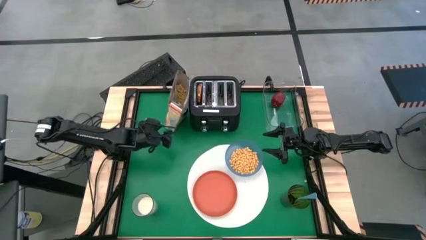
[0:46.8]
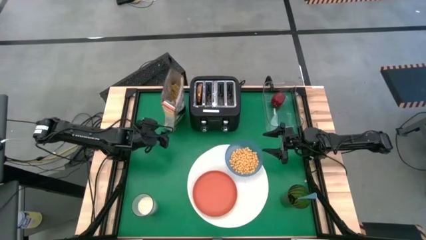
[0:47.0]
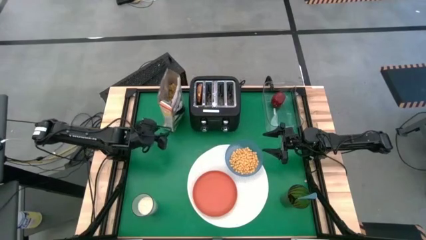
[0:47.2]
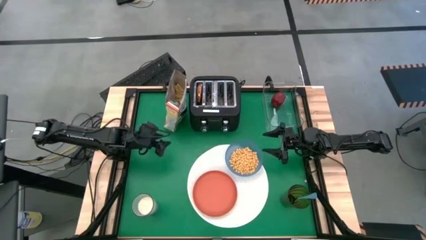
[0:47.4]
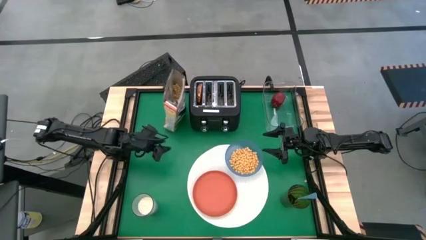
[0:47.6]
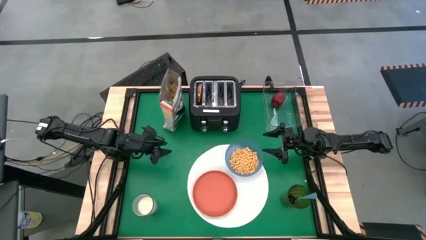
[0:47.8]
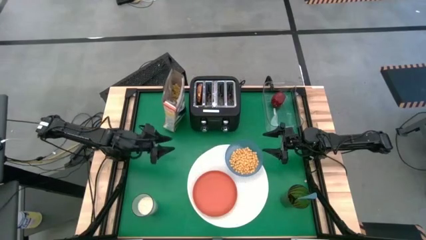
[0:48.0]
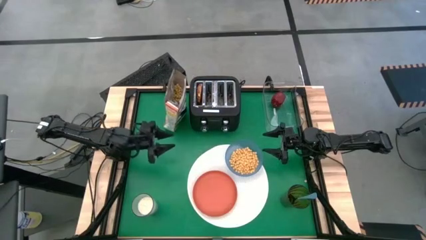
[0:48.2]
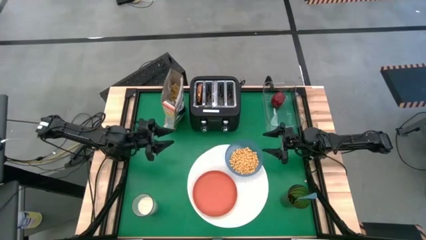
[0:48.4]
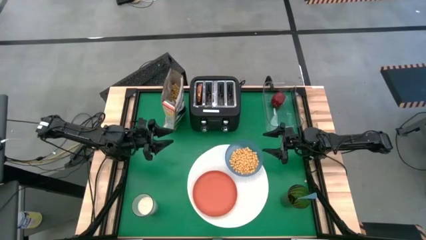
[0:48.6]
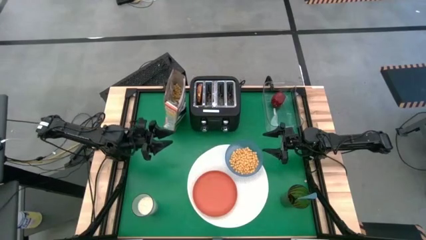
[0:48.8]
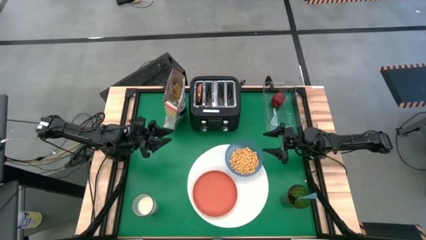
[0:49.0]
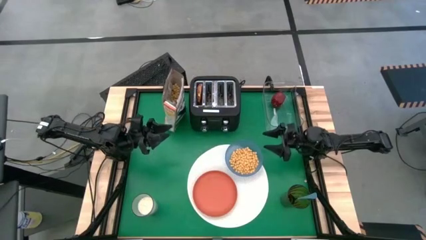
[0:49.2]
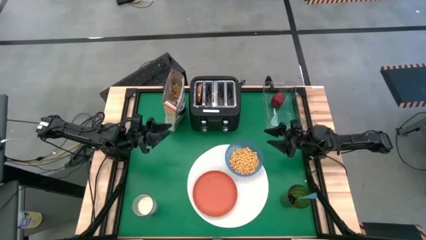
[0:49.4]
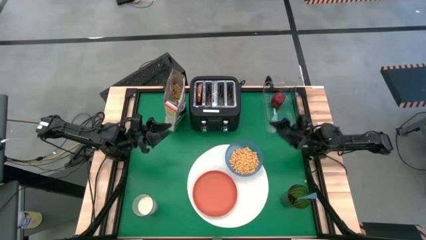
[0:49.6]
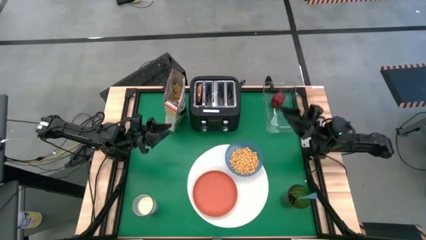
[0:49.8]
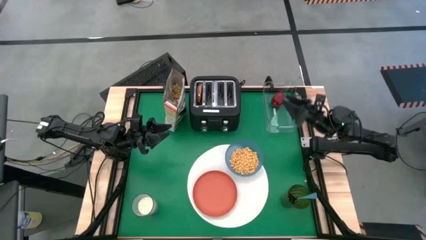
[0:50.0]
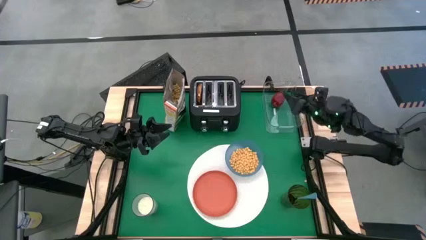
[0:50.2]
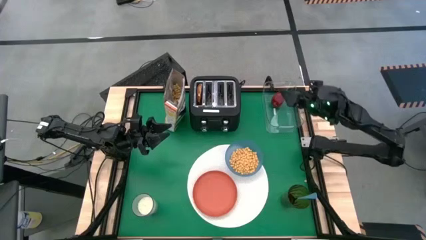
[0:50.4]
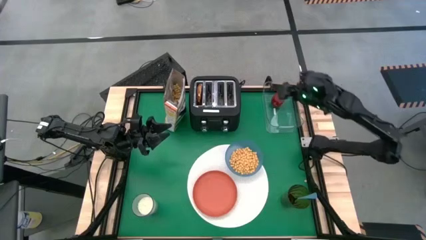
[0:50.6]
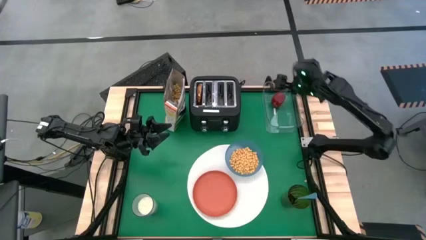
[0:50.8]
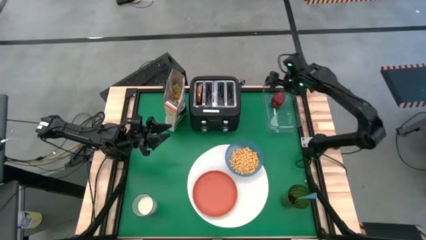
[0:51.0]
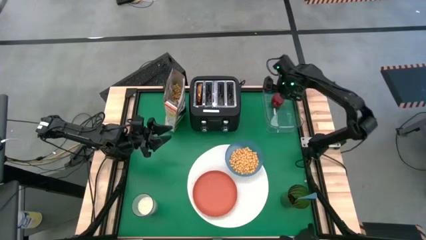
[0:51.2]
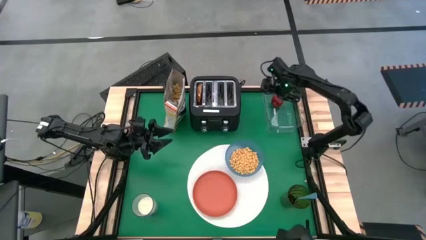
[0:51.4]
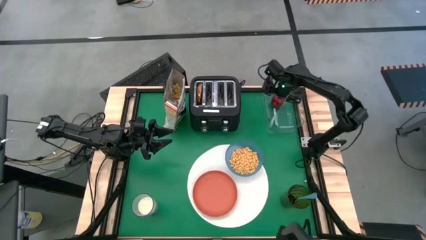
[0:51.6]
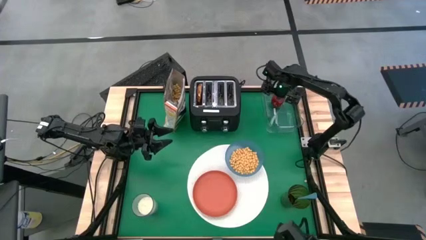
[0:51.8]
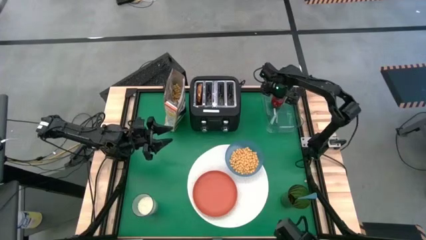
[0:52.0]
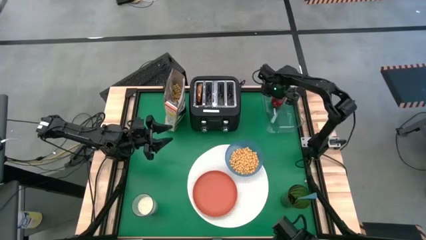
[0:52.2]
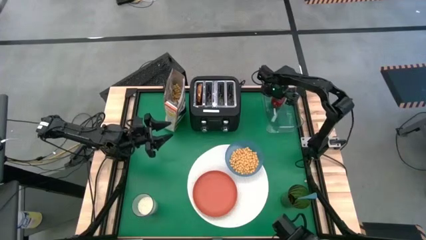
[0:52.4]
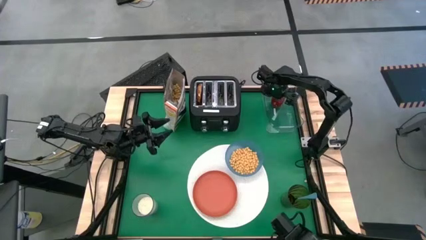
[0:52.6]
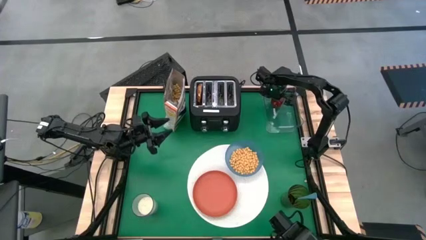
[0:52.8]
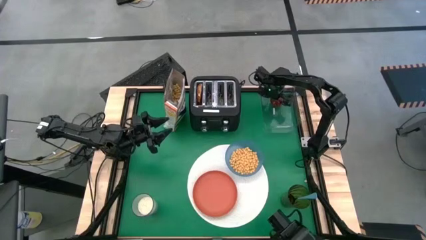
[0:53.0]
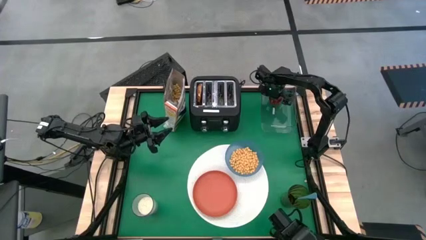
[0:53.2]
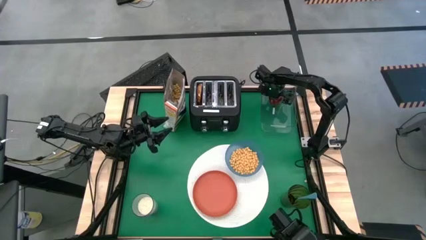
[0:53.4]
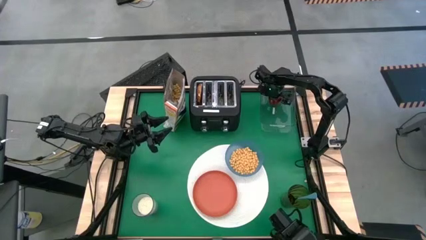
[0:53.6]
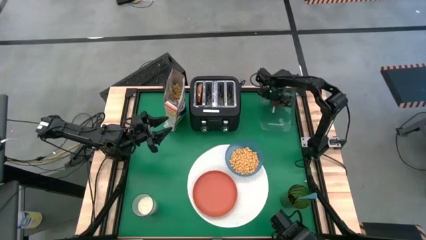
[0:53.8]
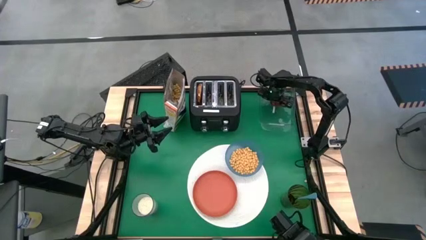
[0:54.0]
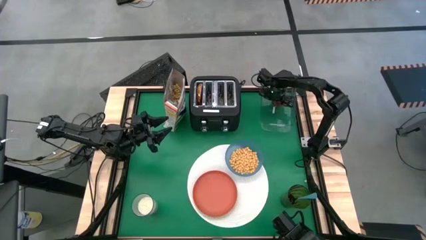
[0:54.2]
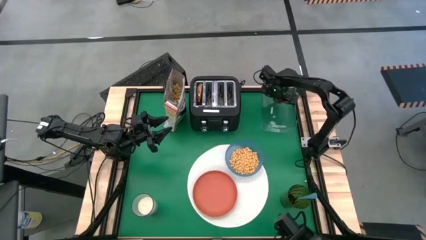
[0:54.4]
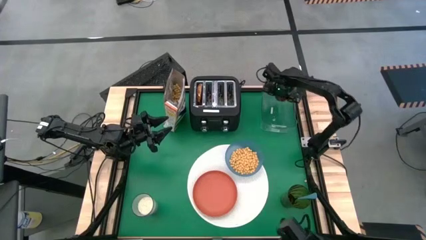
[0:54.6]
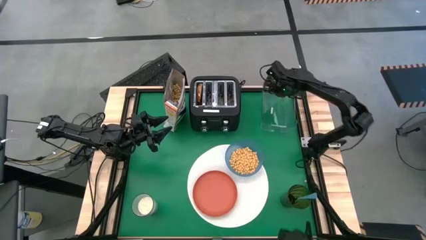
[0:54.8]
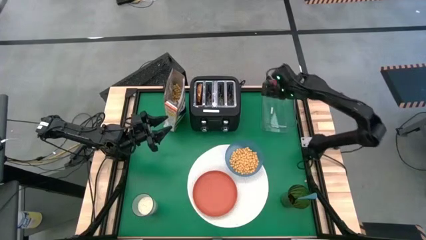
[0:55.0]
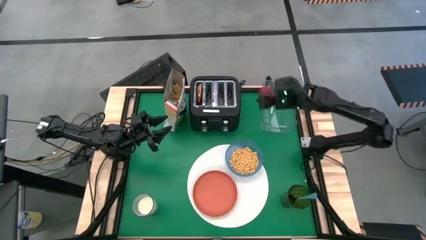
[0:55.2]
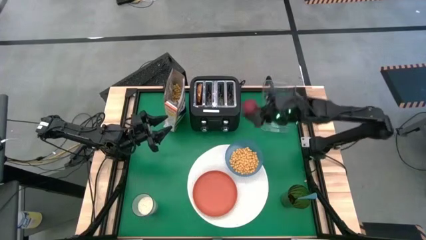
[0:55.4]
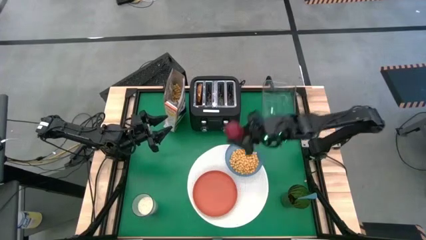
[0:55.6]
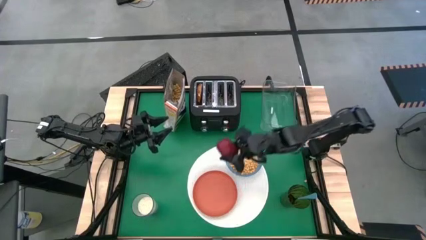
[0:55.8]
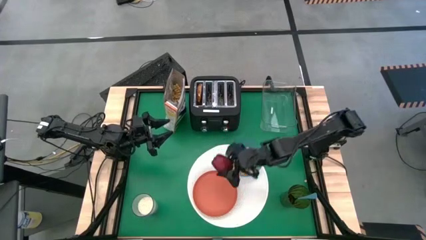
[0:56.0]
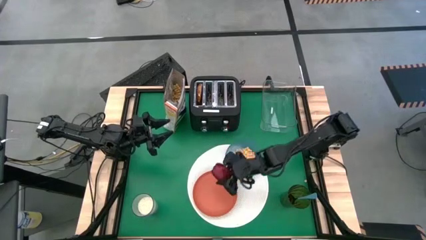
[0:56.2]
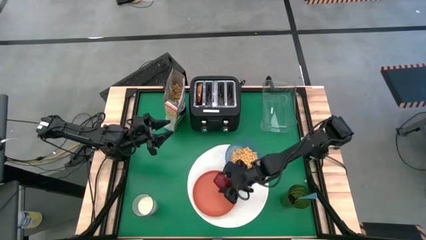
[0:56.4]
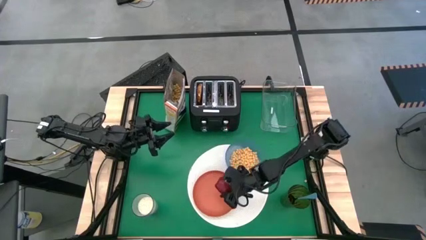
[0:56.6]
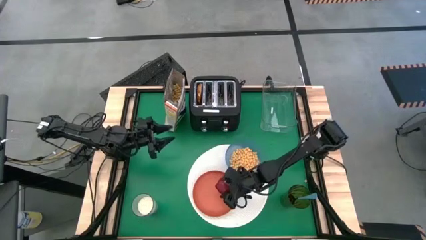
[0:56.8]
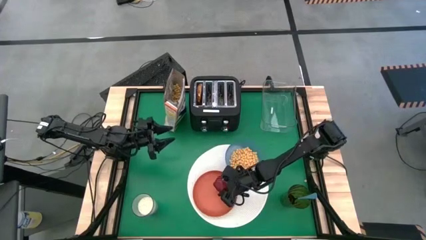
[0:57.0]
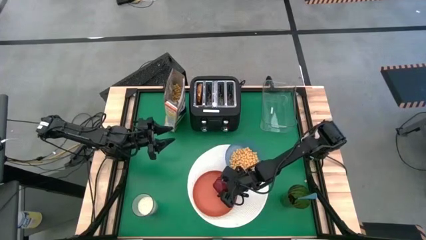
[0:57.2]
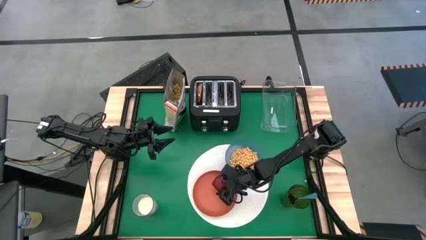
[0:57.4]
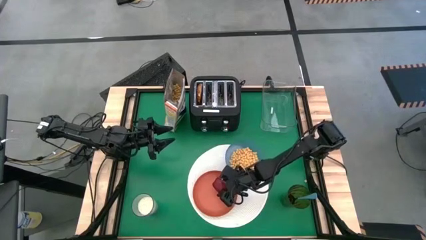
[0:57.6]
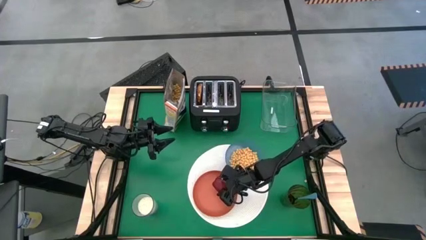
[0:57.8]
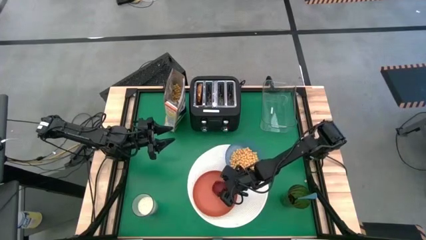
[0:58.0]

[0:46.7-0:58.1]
Task: Arrange a breakfast setting
Put the apple on the orange plate
